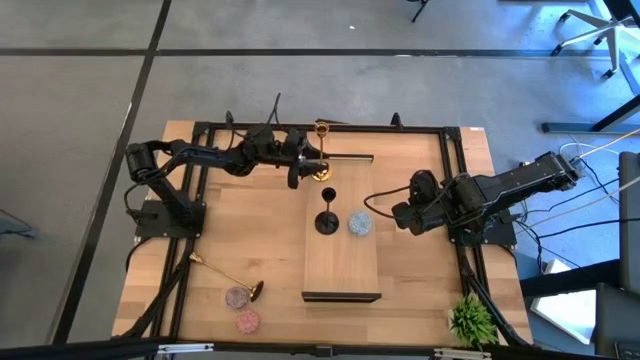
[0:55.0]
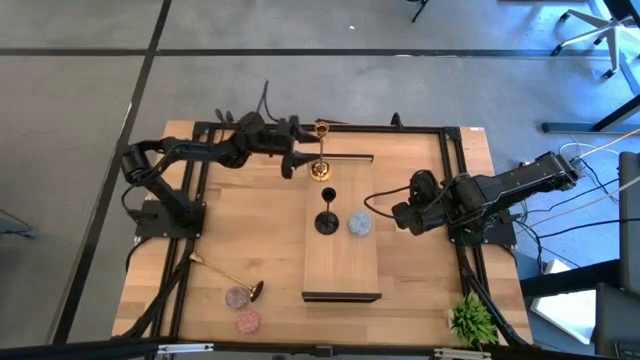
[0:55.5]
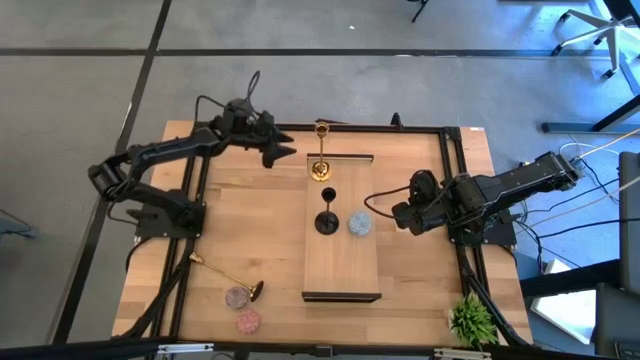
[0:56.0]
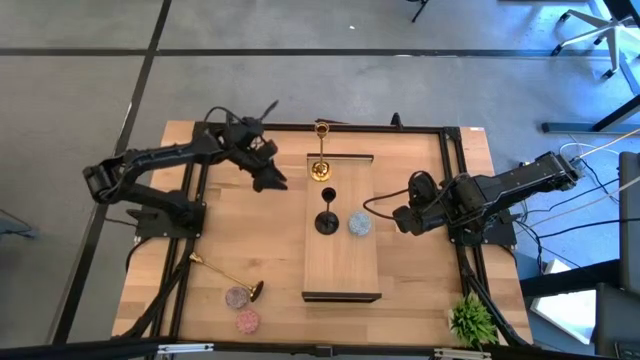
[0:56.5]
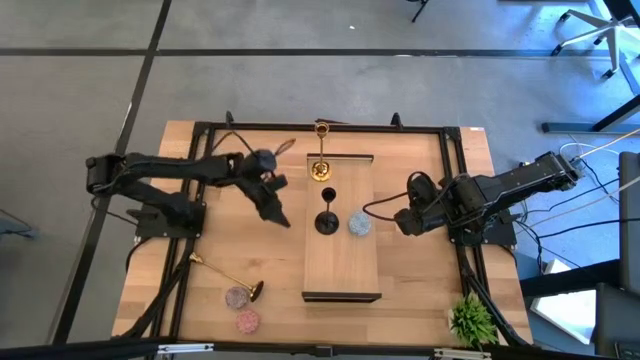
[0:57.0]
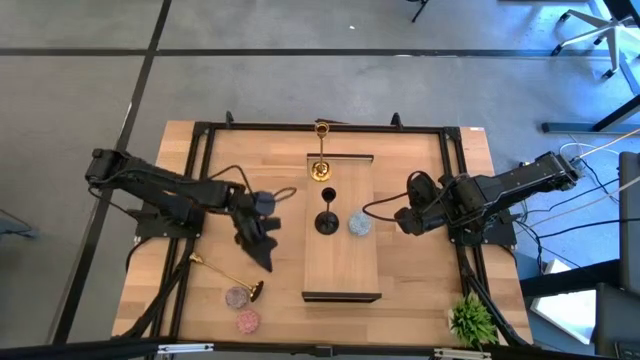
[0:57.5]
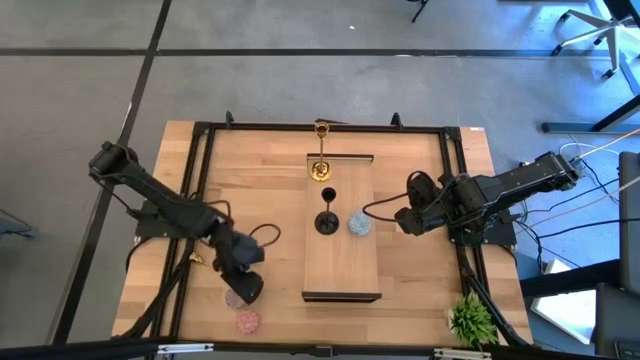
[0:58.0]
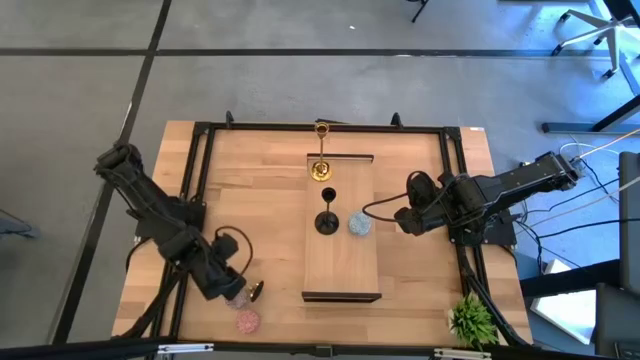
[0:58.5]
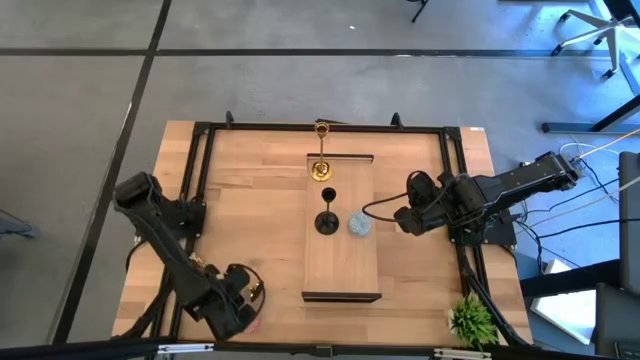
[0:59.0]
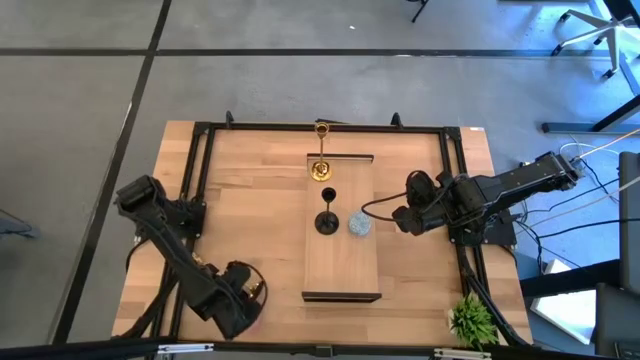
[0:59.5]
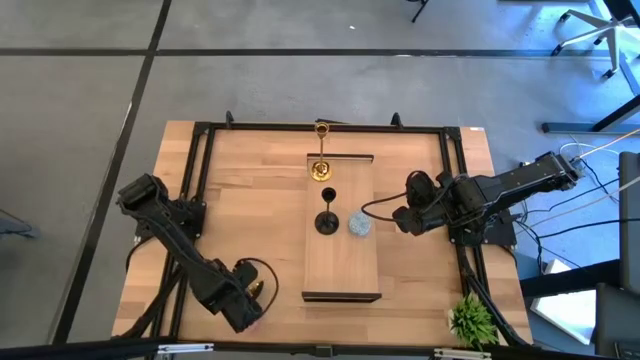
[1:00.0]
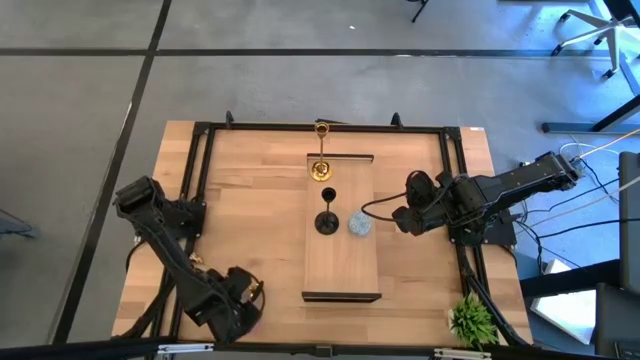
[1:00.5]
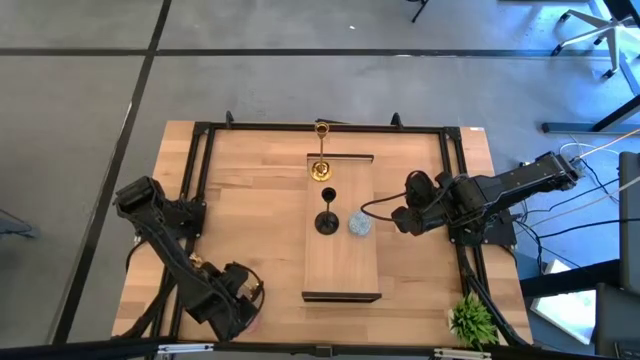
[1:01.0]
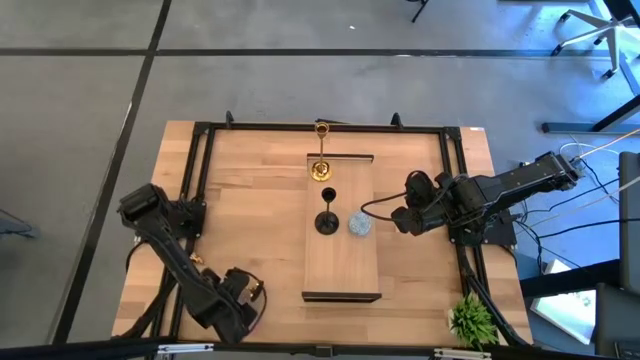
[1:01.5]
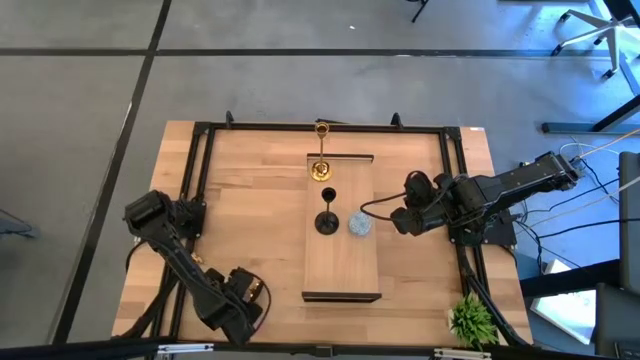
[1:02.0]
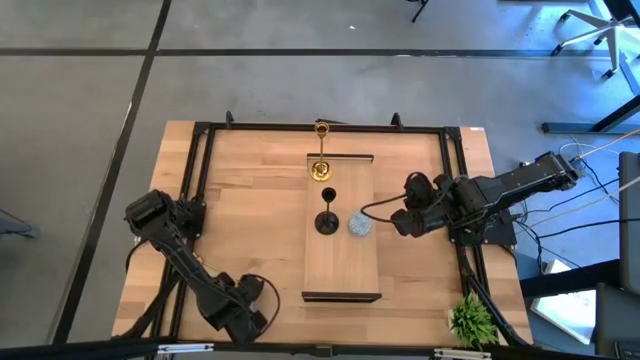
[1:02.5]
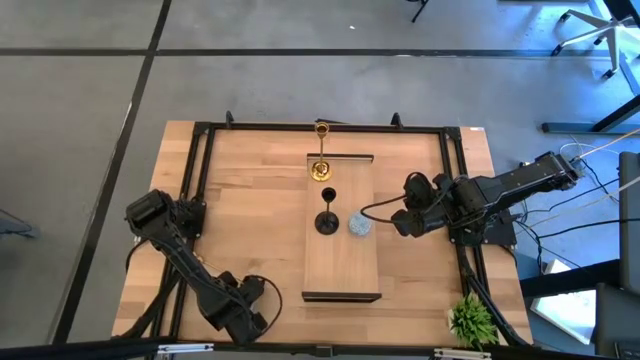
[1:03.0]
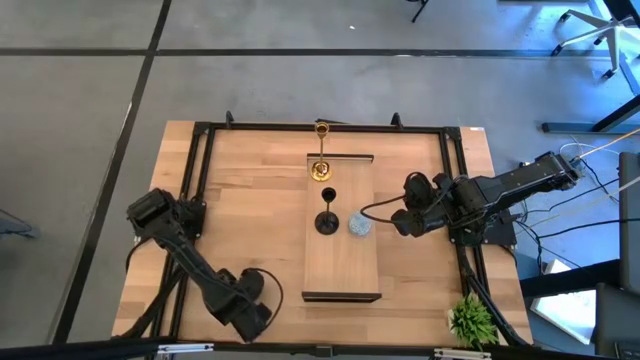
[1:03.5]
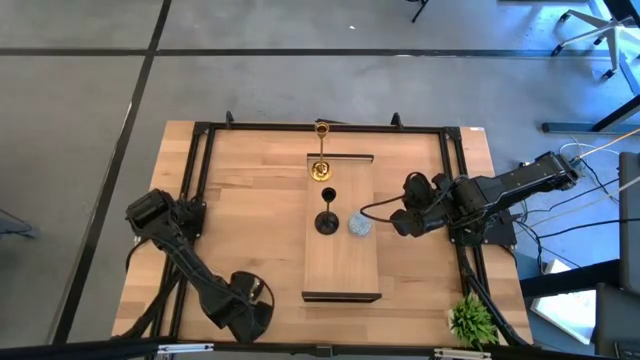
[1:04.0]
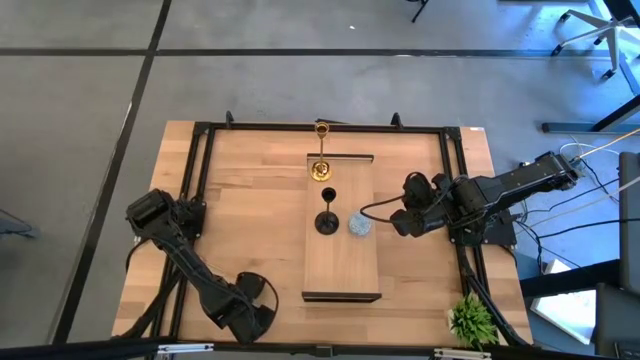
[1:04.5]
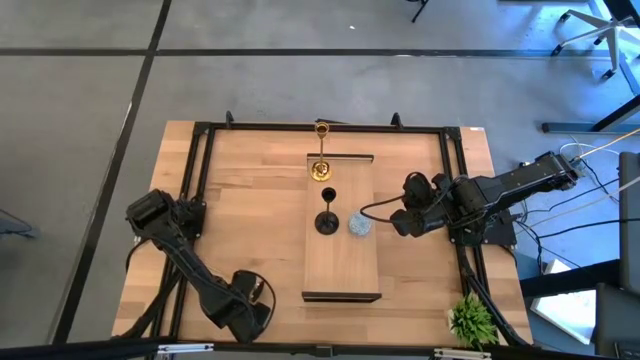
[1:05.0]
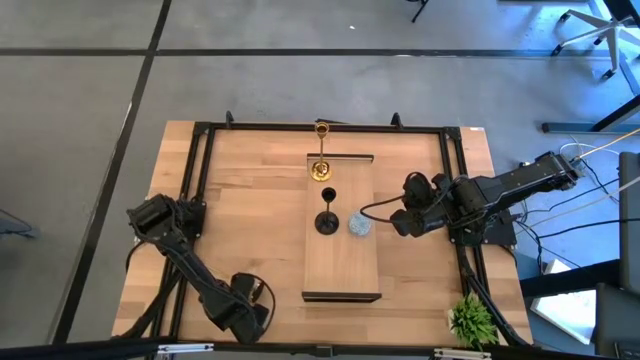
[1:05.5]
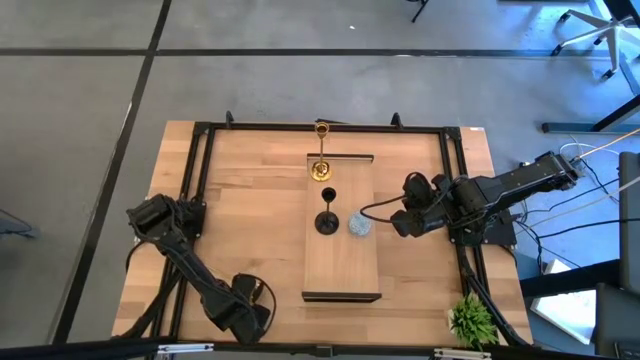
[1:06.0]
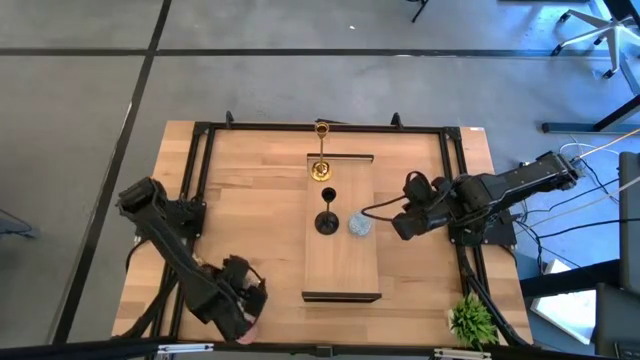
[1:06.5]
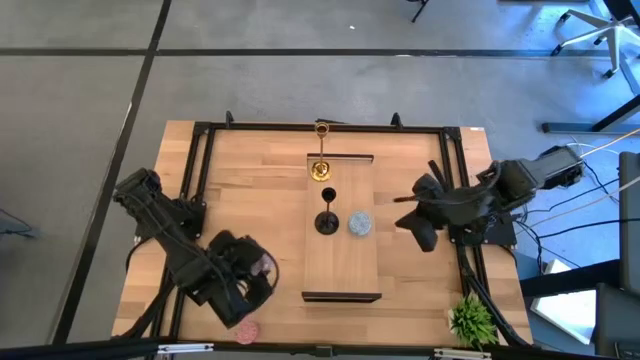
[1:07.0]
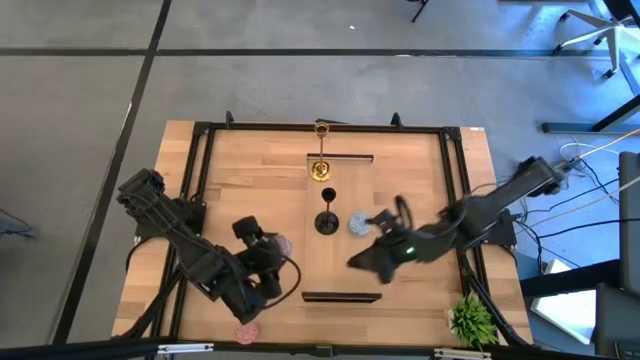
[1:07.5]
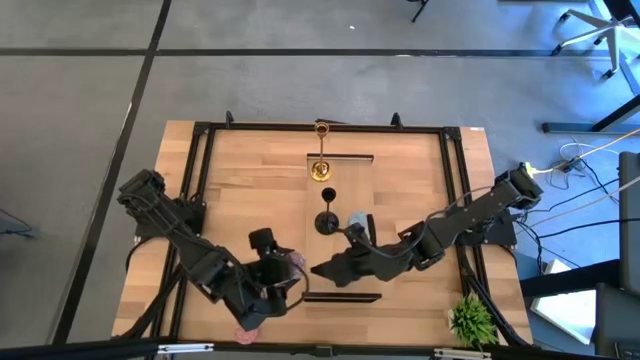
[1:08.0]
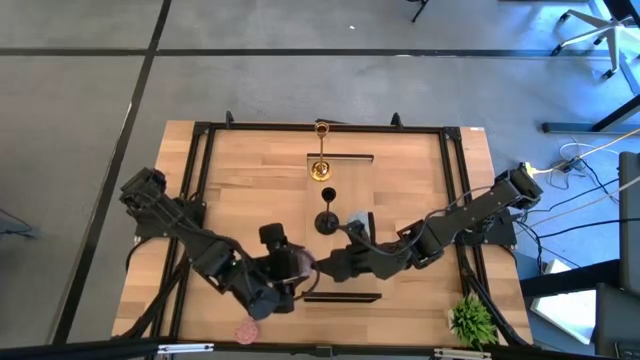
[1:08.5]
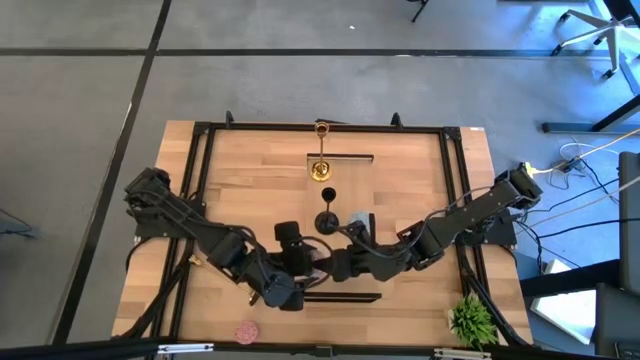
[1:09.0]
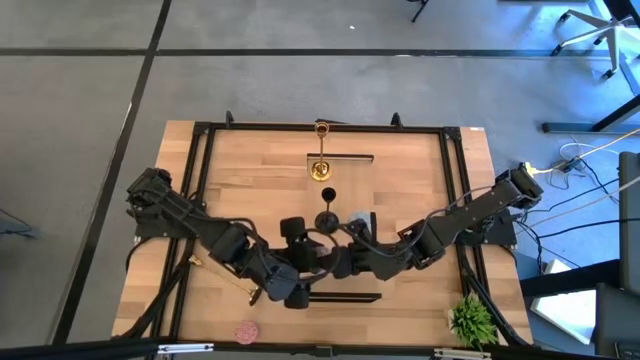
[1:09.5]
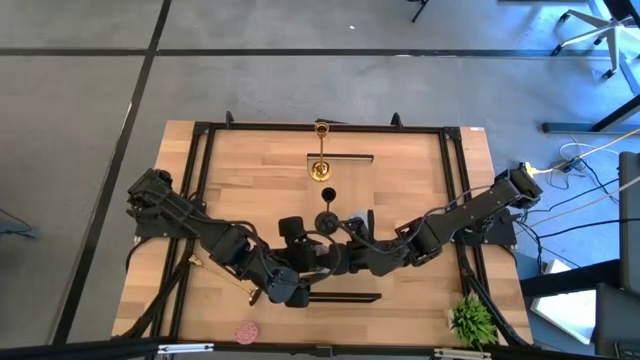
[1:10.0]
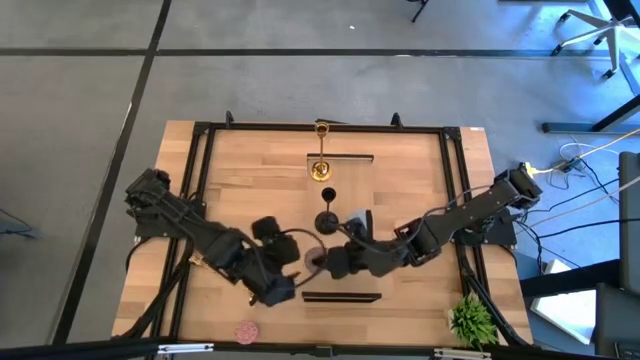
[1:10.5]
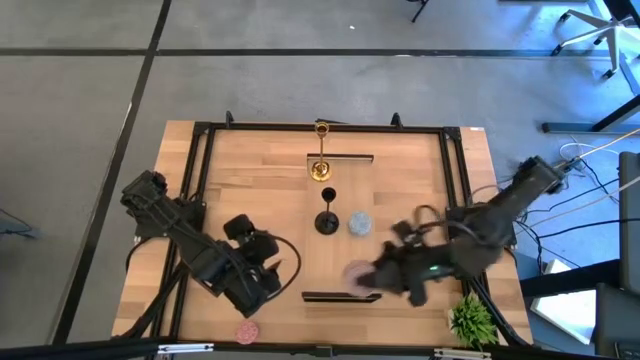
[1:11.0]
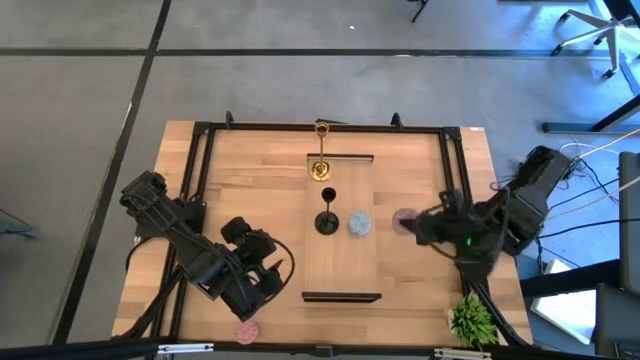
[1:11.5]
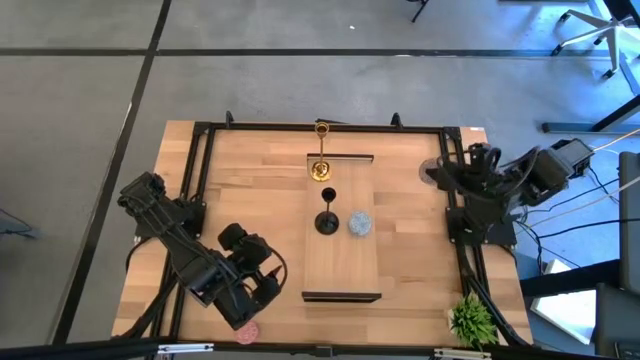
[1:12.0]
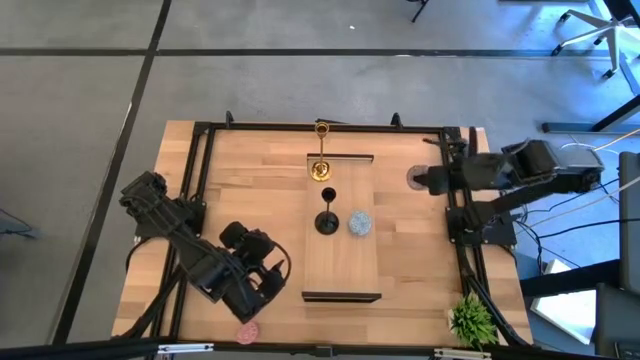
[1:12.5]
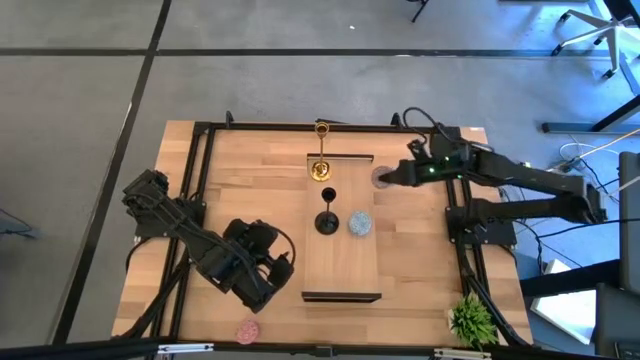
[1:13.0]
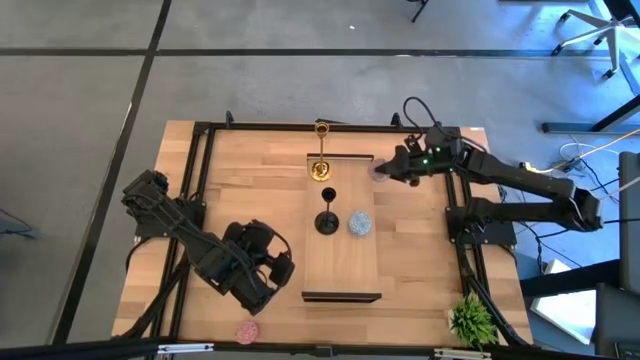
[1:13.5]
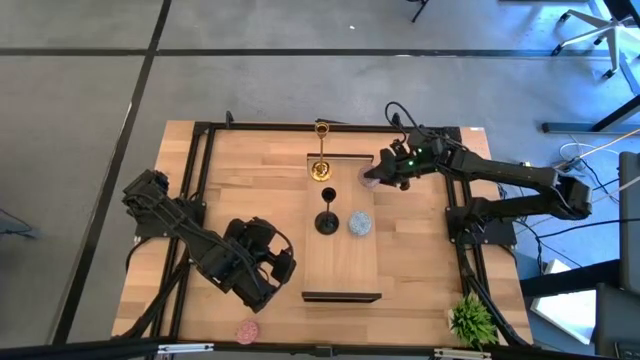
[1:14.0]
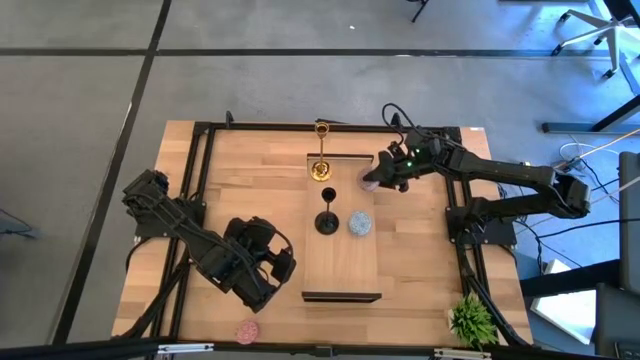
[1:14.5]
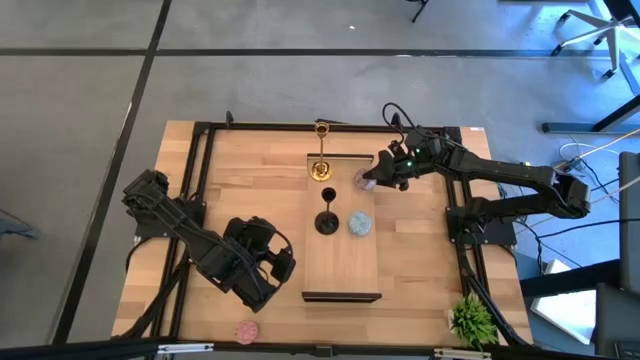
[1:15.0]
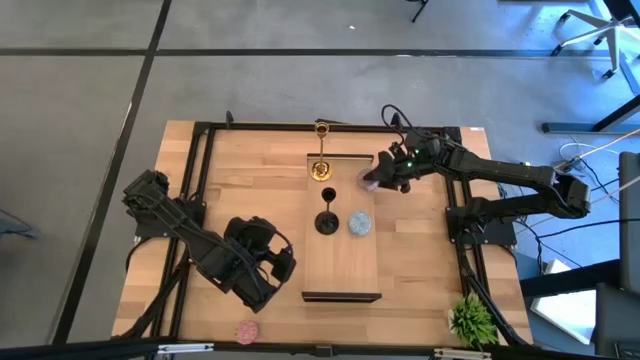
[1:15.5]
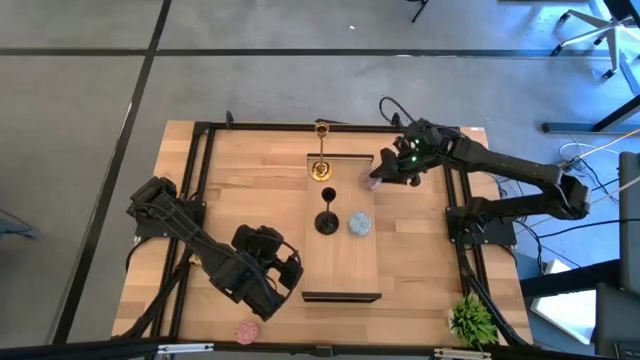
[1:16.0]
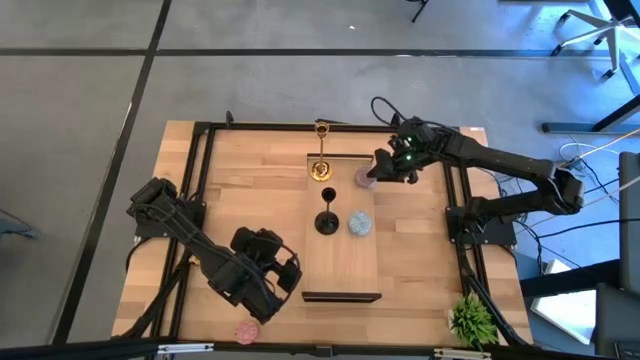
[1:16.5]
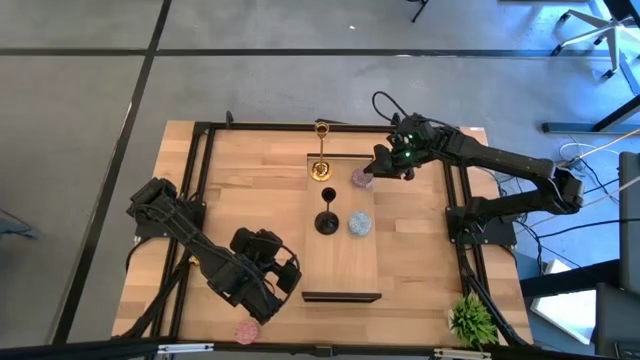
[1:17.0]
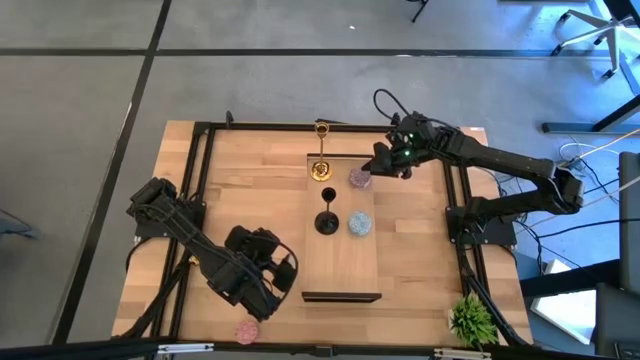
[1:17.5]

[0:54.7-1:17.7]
Task: Pick & Place candle stick holders
Put the red brown scented candle on the shelf
